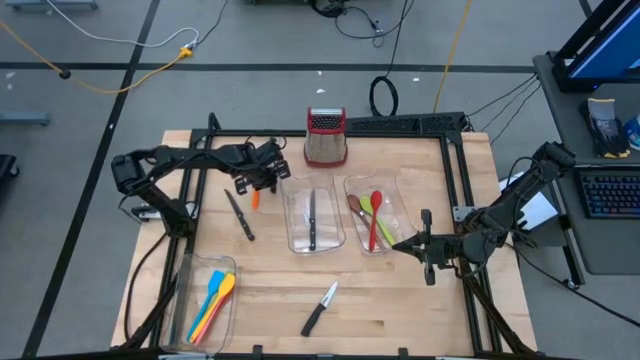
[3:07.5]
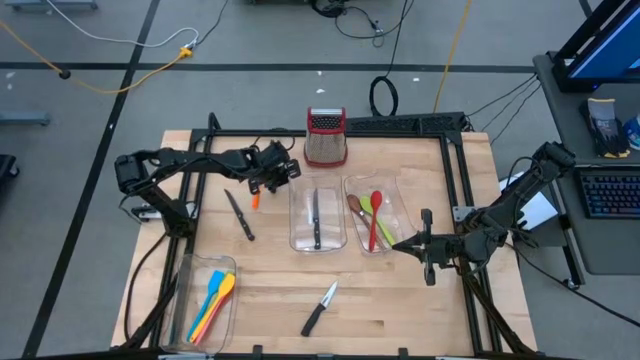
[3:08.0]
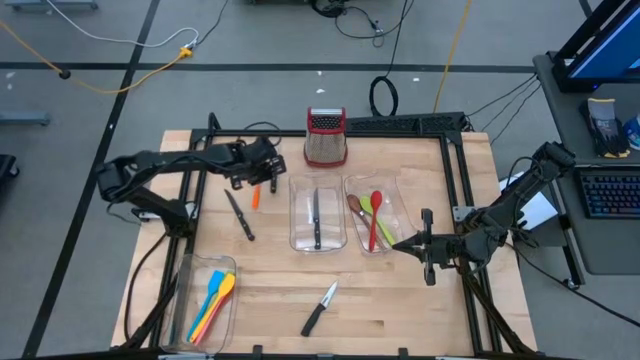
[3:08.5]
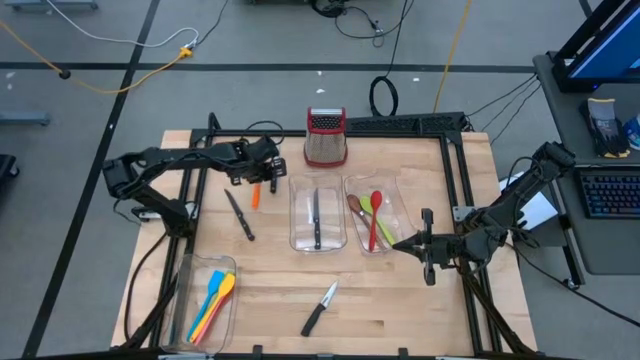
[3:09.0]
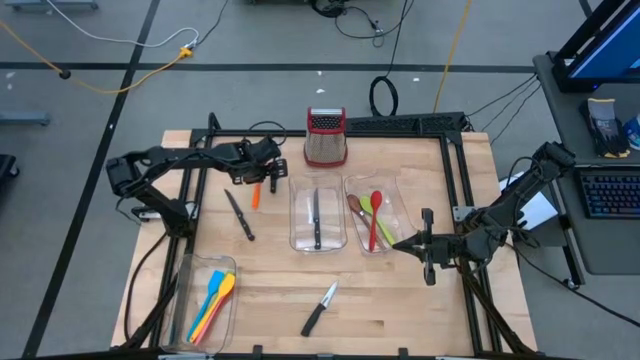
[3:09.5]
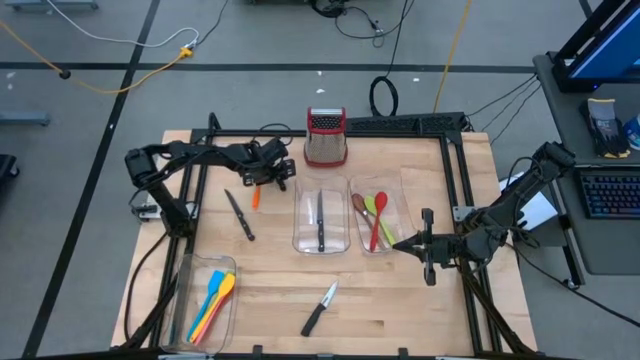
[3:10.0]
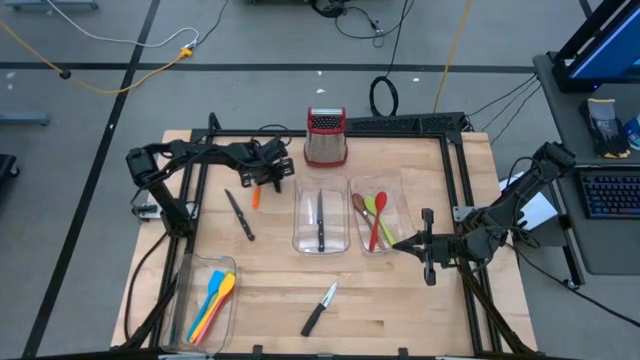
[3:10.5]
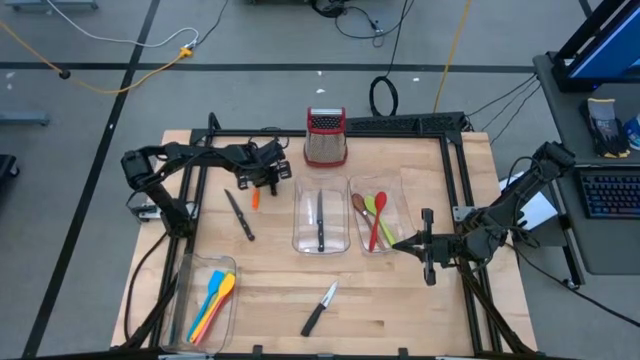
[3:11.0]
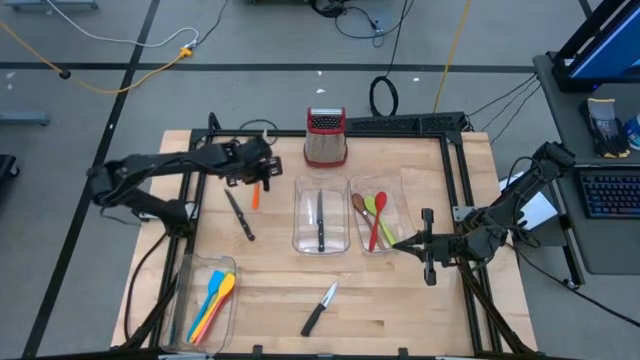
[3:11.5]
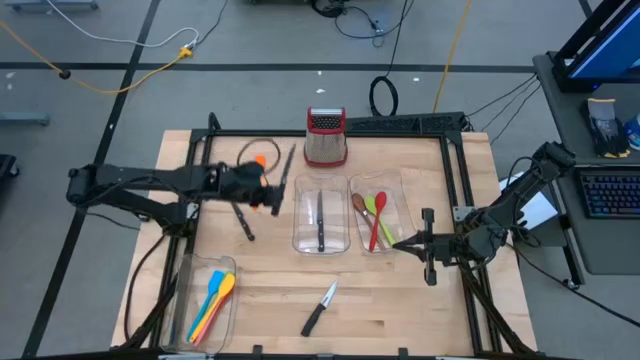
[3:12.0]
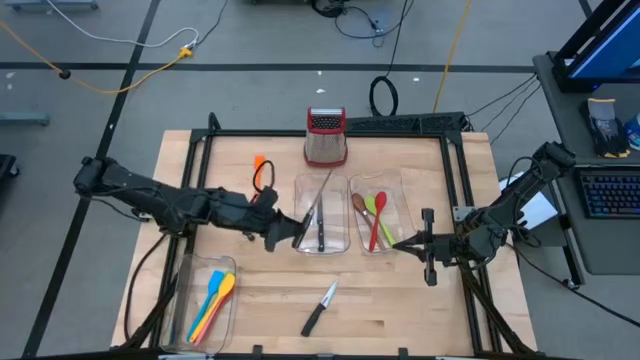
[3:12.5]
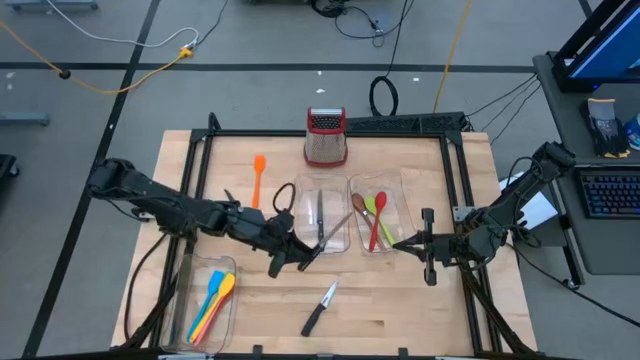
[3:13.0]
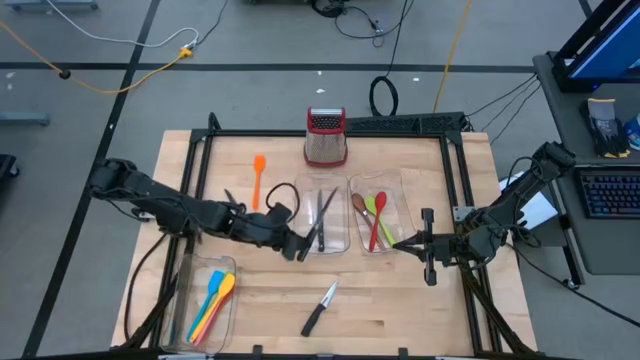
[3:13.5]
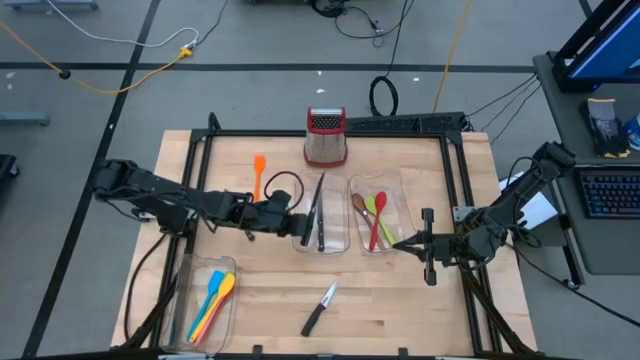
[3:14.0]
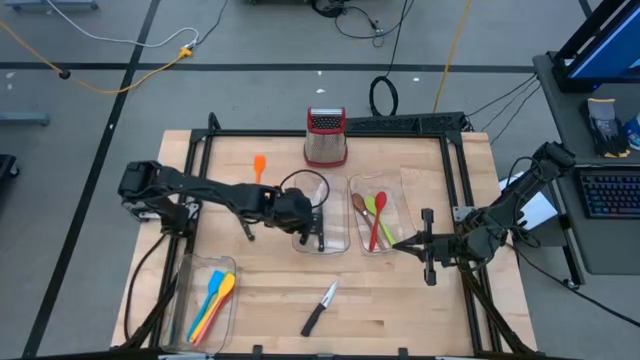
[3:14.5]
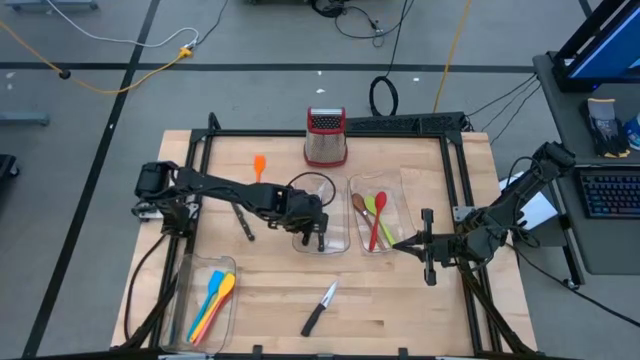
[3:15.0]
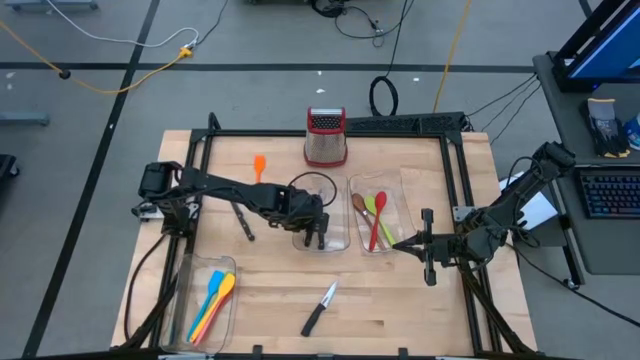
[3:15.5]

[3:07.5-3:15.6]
Task: Pick & Place Kitchen Items
Put the black knife into the middle transparent bin

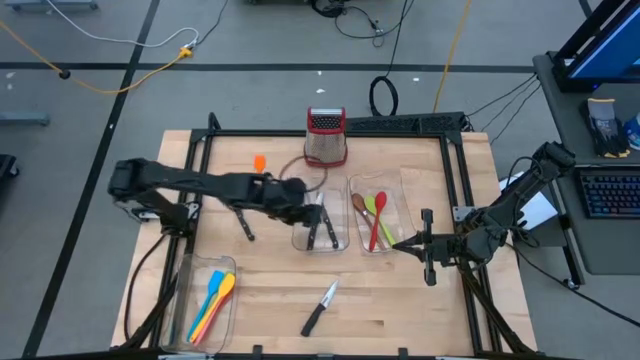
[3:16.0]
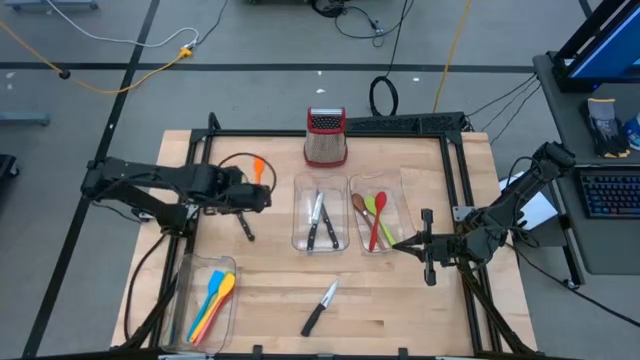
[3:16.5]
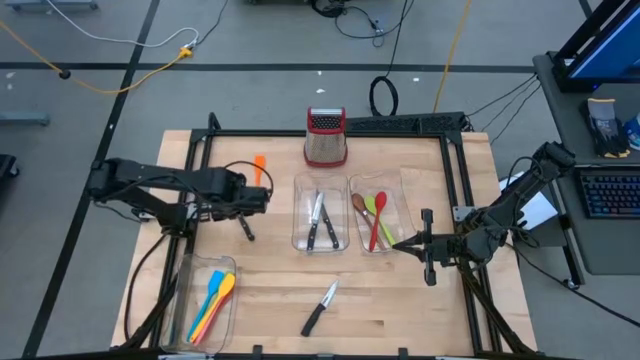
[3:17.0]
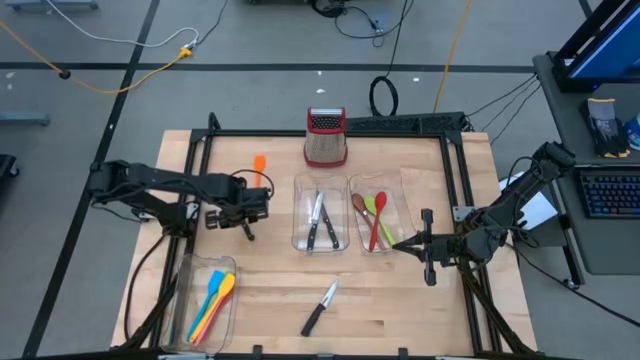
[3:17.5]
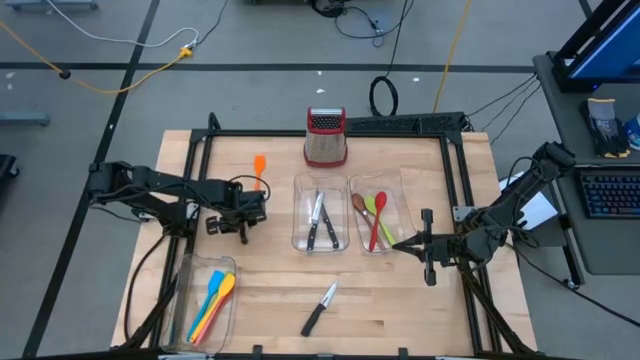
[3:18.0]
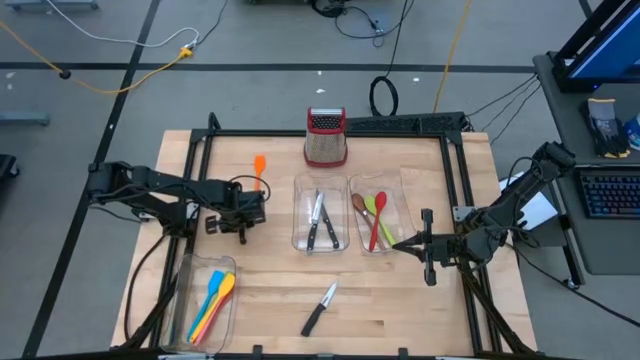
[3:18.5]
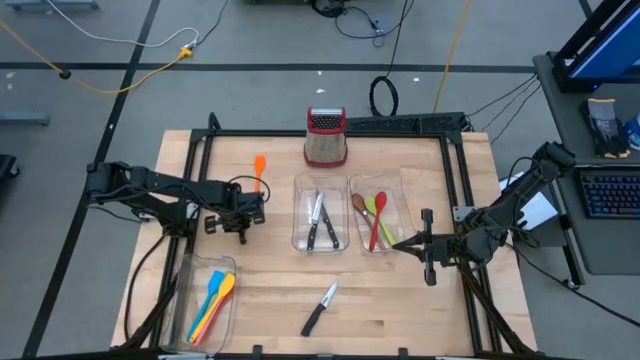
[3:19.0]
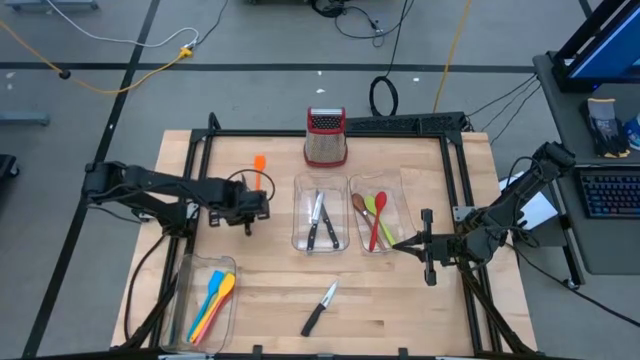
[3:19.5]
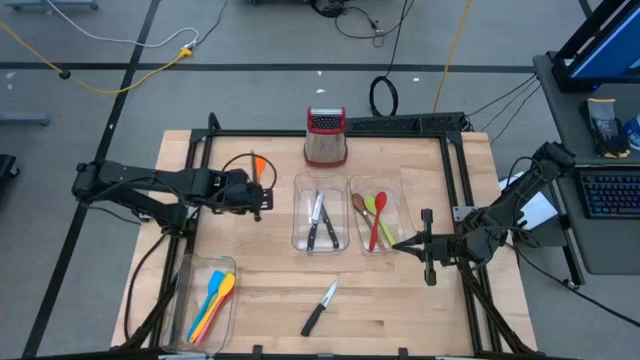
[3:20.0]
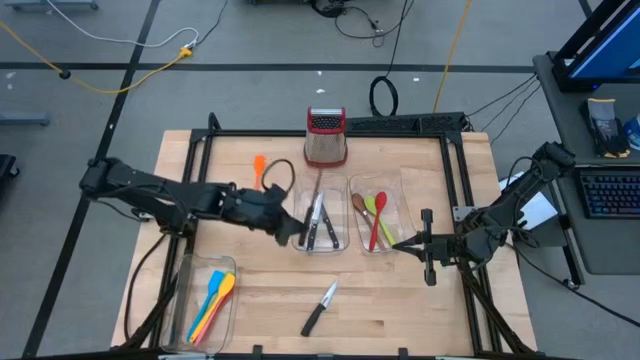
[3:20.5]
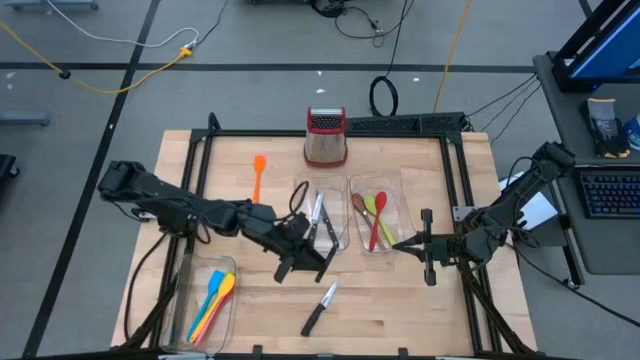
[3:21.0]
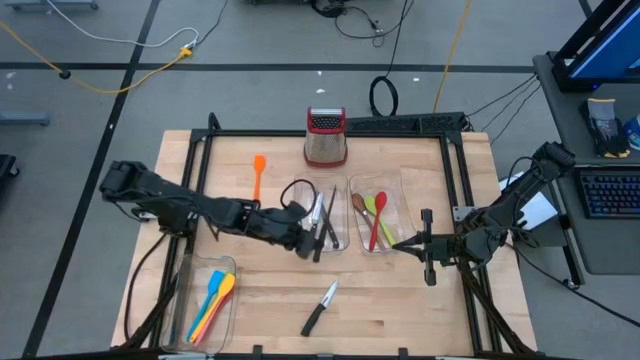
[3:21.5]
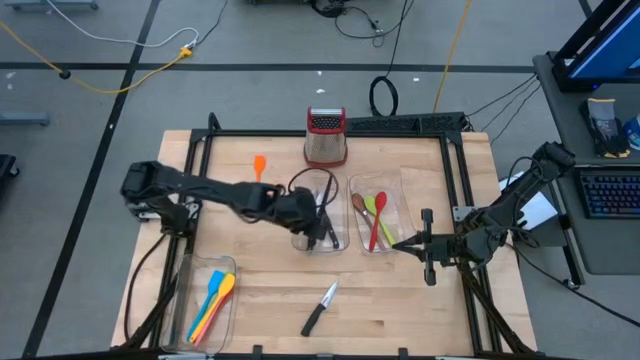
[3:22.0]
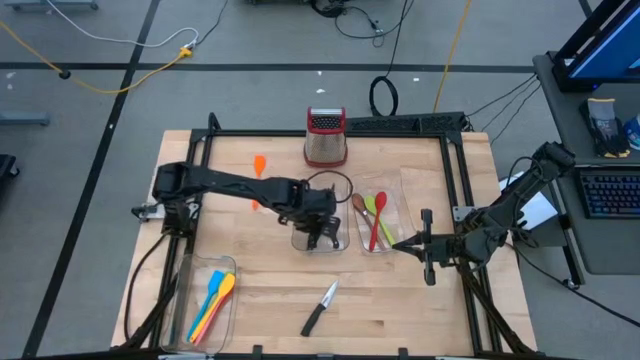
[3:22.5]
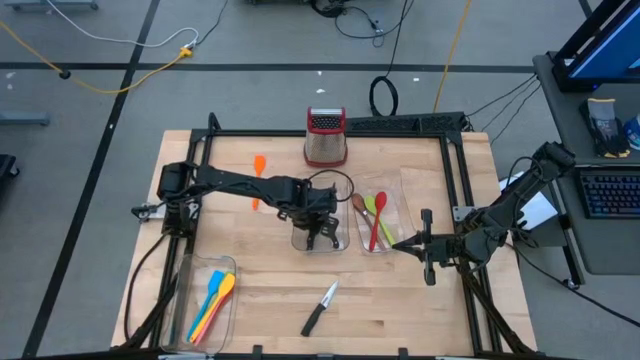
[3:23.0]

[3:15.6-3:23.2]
Put the black knife into the middle transparent bin

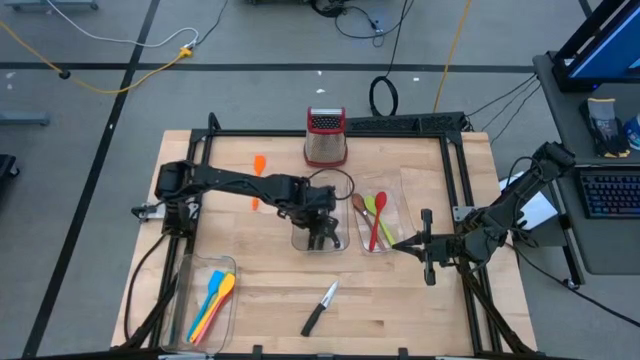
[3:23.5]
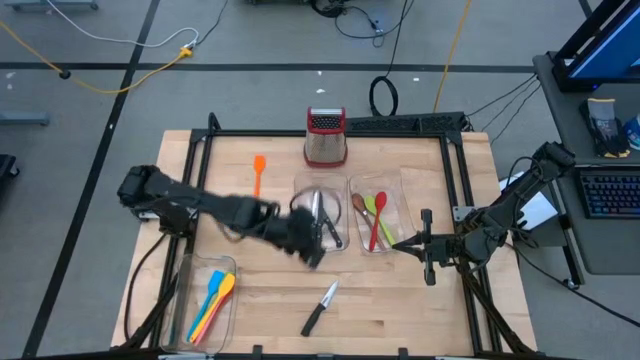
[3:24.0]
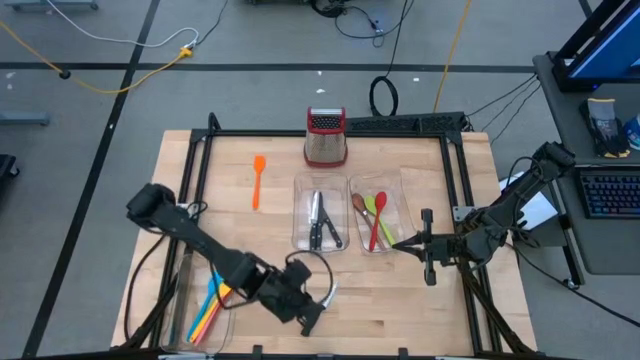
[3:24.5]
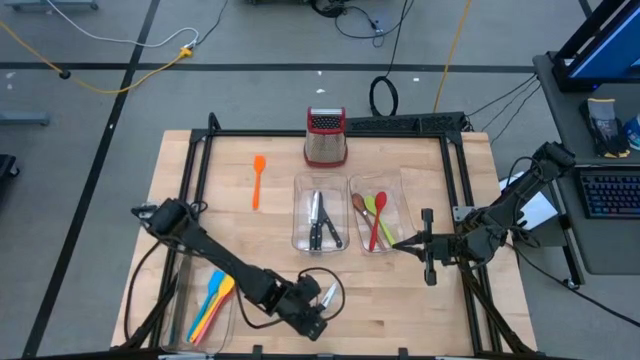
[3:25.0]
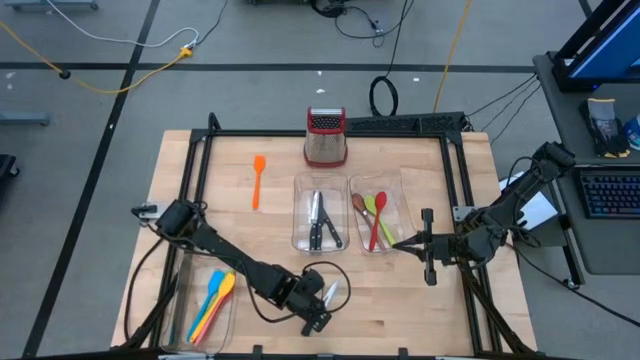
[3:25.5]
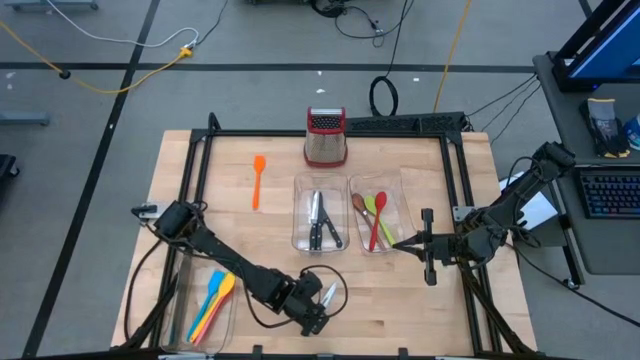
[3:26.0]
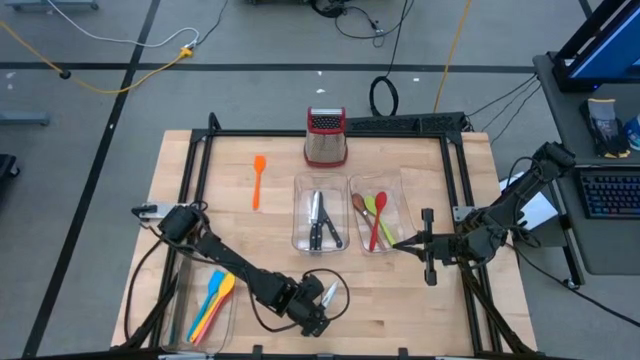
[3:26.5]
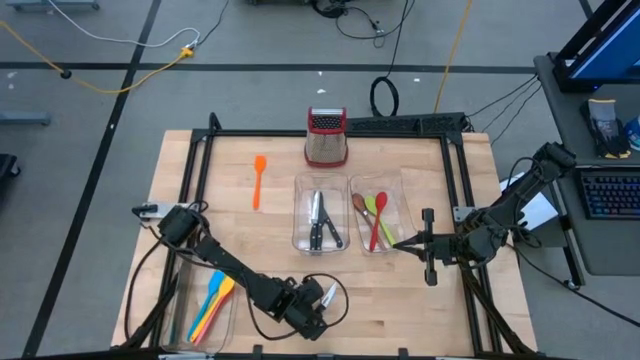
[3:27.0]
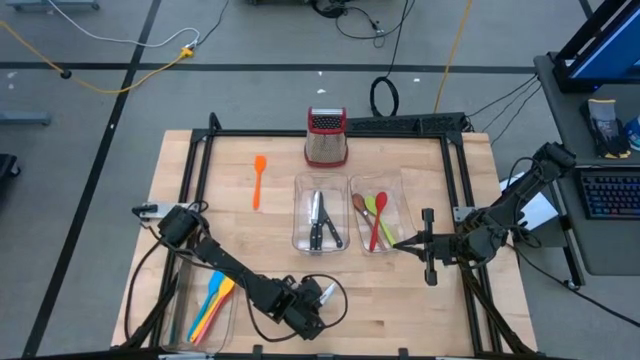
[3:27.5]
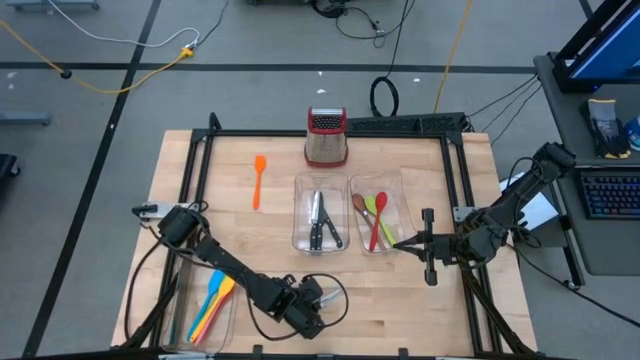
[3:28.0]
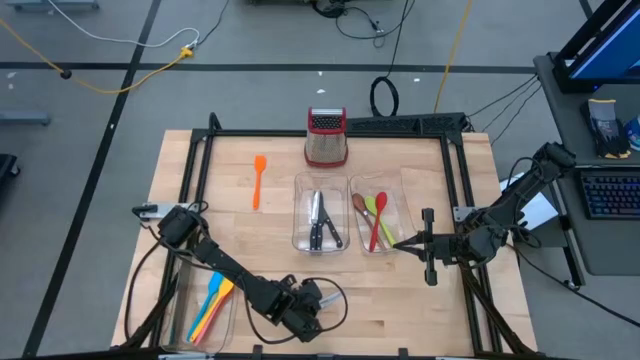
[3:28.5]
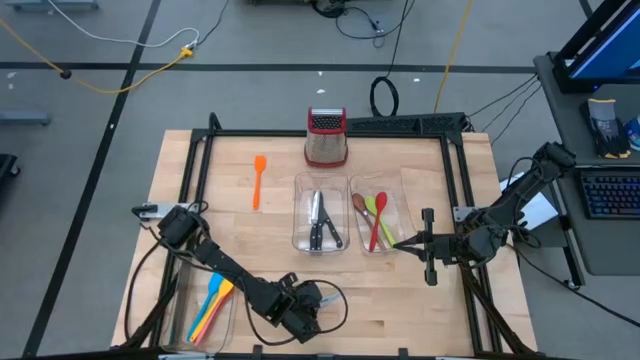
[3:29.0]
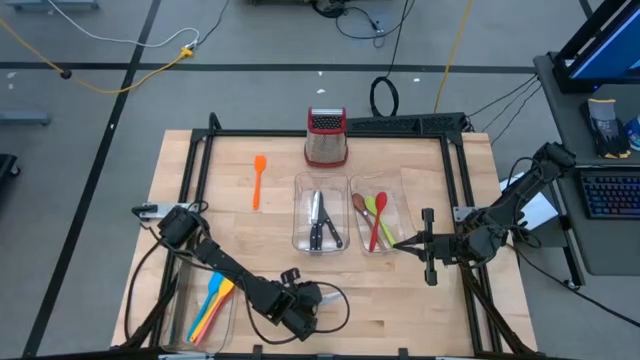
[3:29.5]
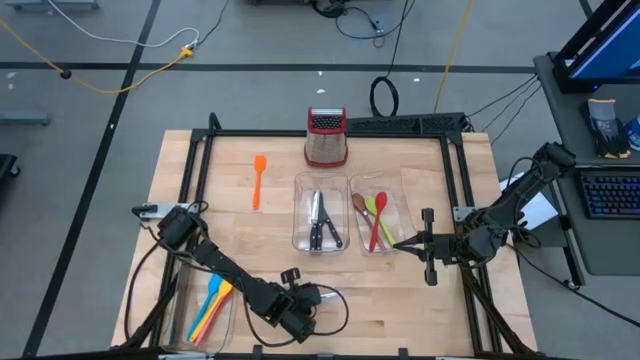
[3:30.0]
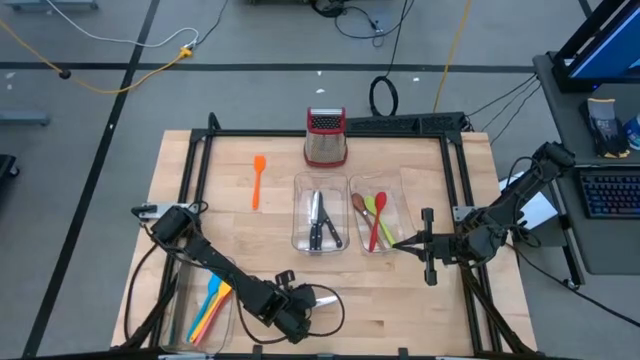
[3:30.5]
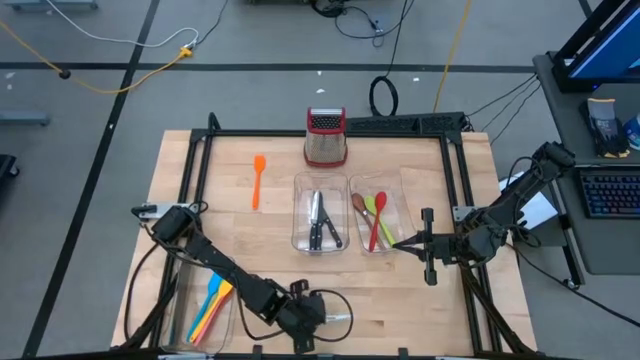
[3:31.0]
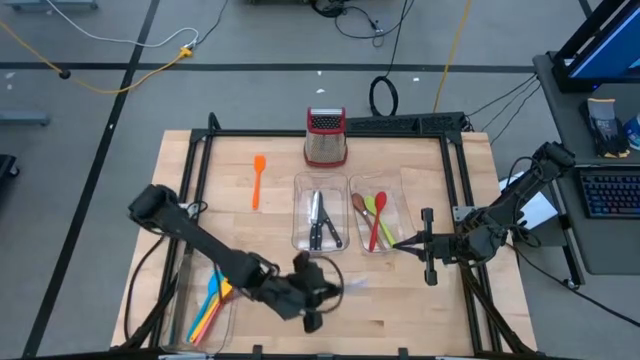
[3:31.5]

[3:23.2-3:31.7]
Put the black knife into the middle transparent bin
